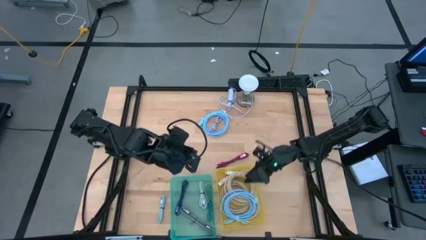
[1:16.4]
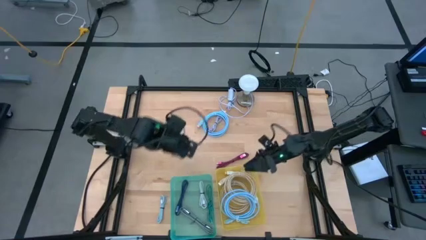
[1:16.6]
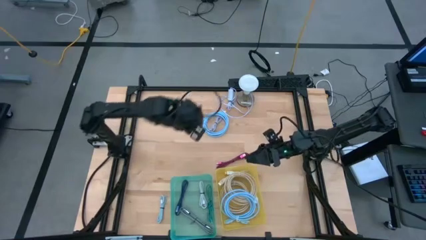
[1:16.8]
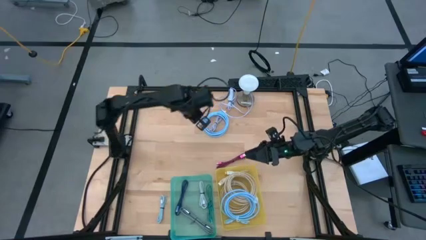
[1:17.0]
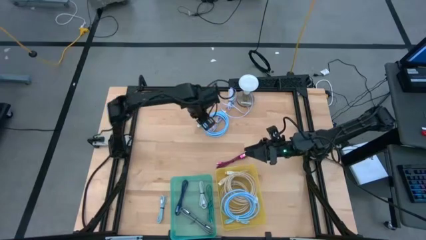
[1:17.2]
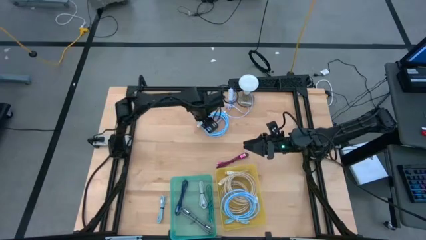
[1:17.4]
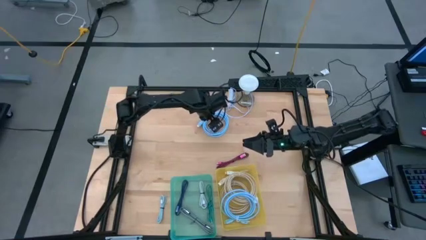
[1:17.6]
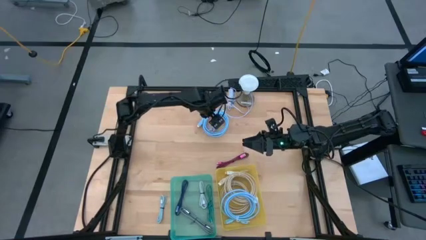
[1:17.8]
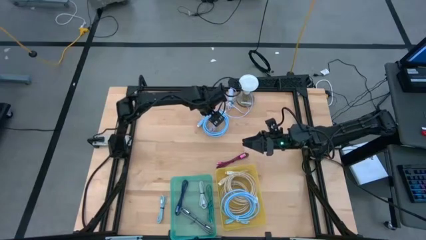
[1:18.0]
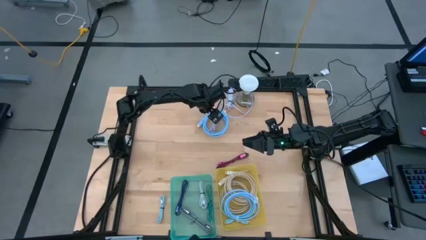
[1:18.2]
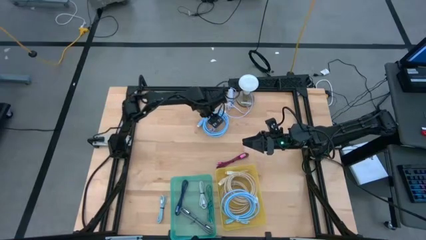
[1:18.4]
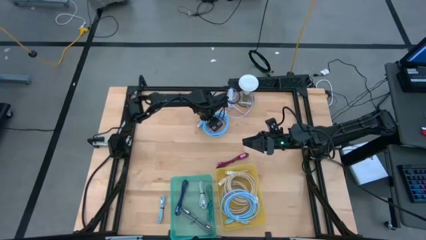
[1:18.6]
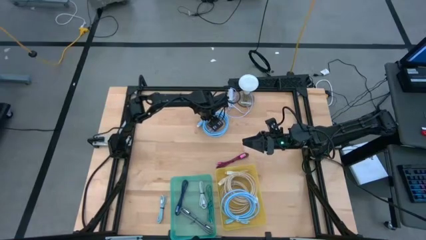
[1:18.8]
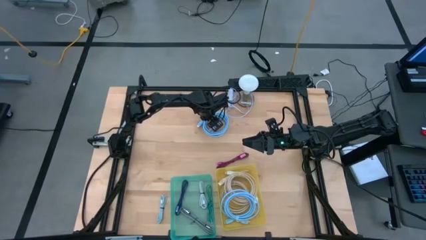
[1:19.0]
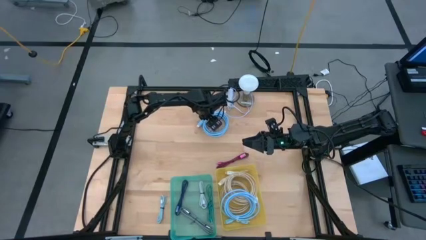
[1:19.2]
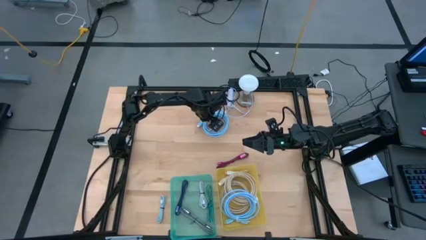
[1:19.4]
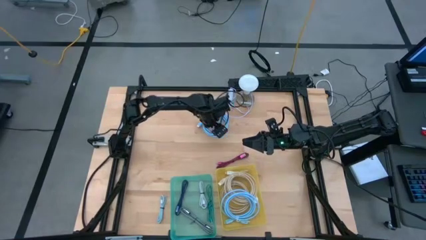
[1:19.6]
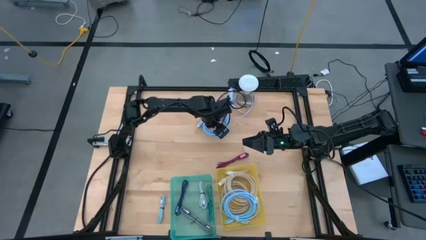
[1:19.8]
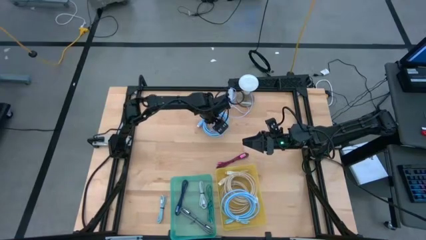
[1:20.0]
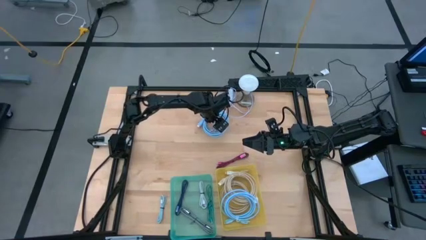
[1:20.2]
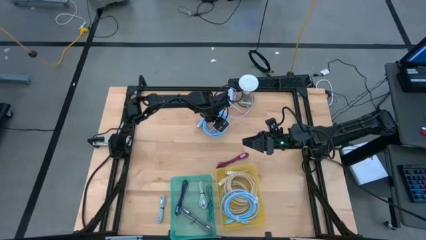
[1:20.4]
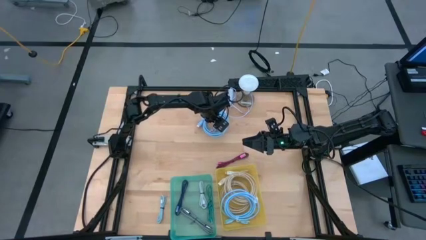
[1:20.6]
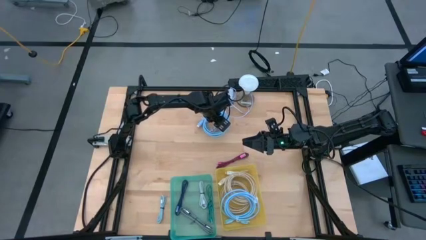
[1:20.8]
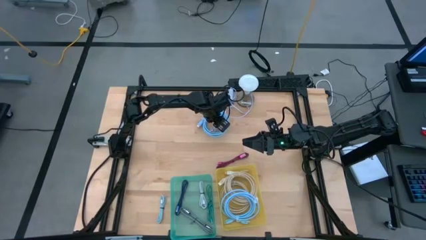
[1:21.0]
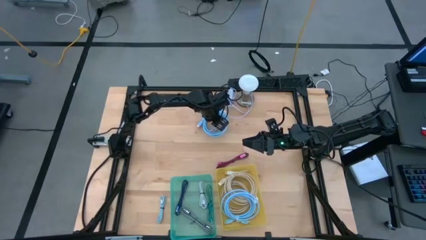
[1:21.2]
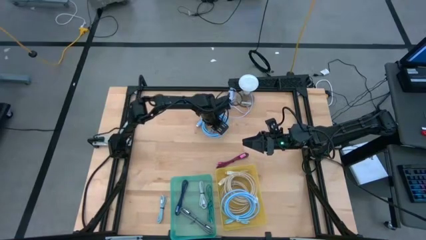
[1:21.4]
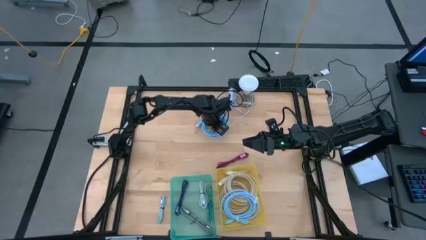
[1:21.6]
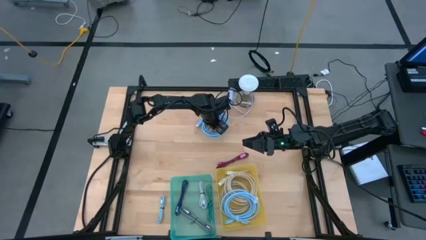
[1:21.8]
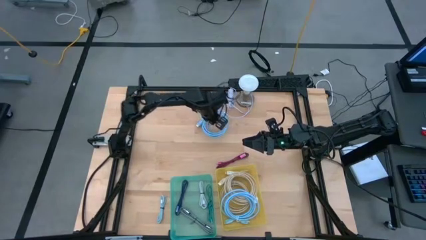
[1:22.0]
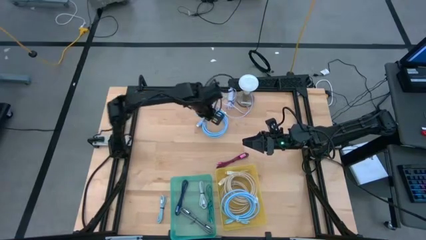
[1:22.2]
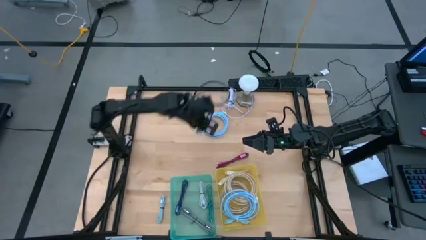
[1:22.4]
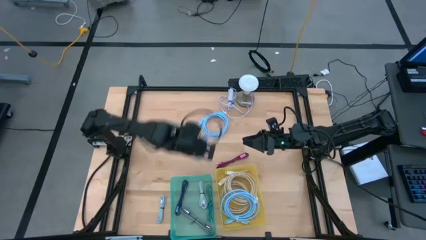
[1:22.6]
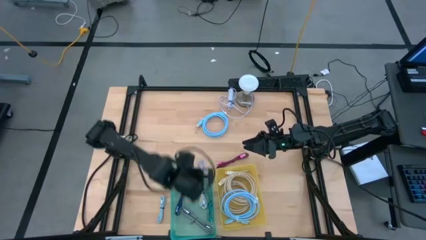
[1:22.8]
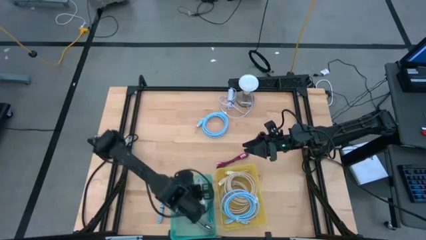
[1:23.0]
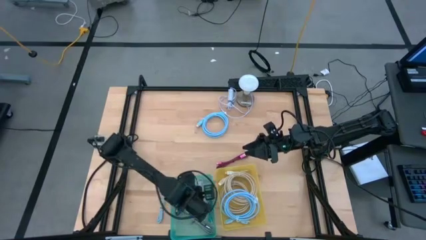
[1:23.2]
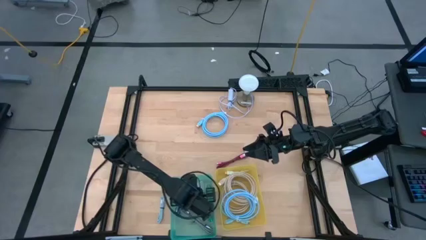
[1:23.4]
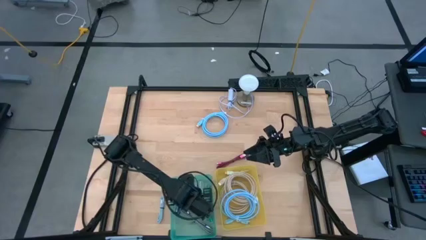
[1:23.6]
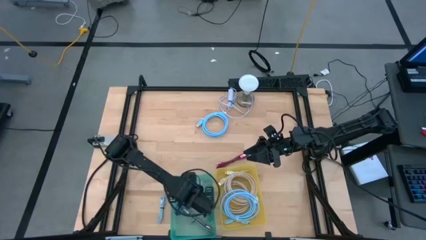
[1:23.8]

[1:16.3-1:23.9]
Task: Pick & Place USB Port
Put the violet charger cable into the green bin

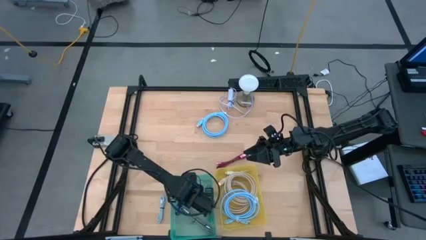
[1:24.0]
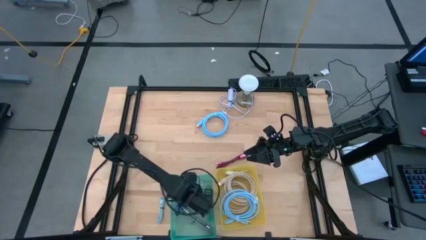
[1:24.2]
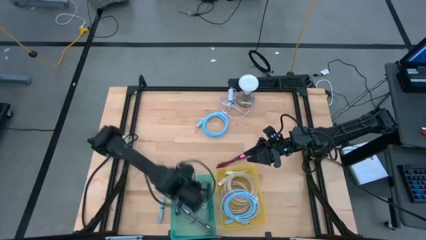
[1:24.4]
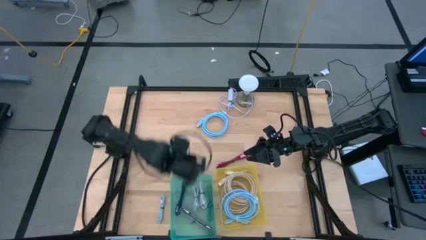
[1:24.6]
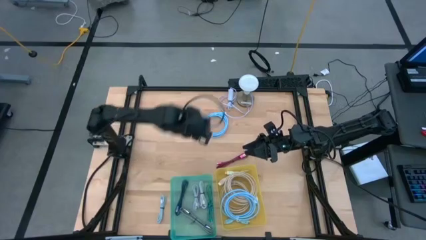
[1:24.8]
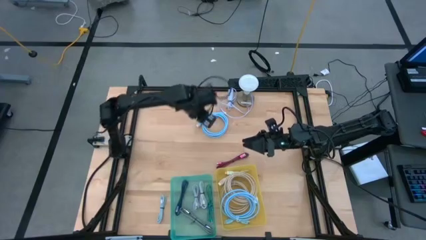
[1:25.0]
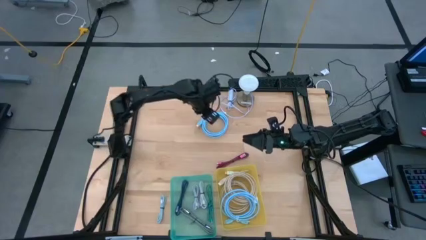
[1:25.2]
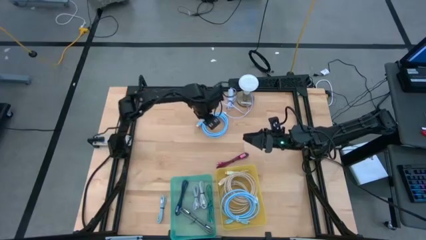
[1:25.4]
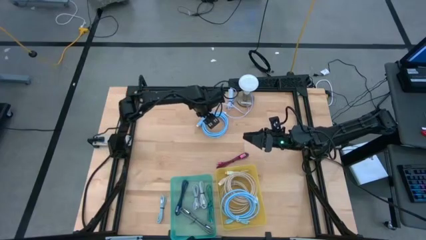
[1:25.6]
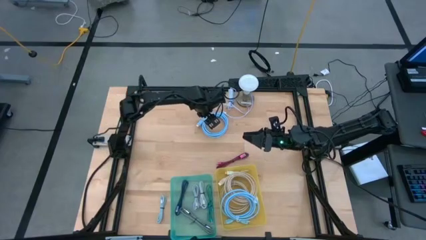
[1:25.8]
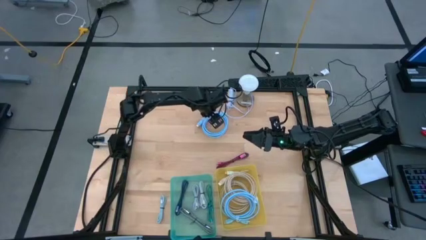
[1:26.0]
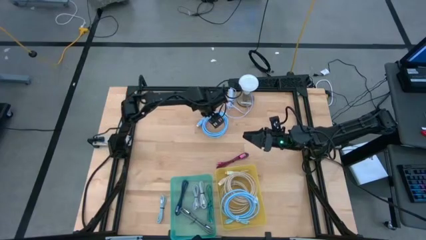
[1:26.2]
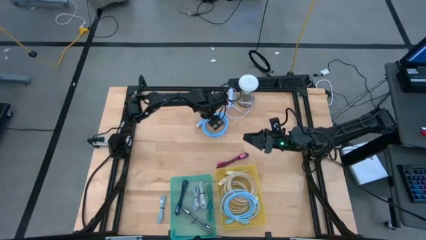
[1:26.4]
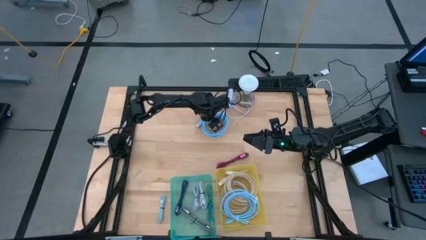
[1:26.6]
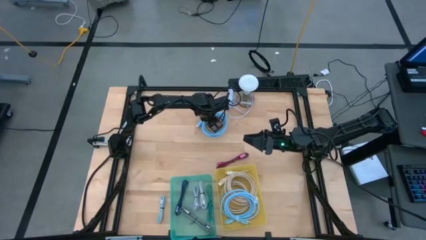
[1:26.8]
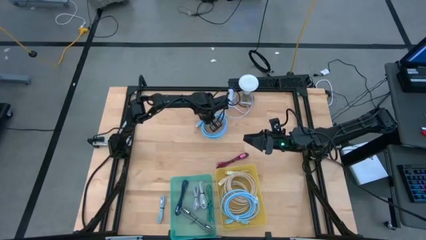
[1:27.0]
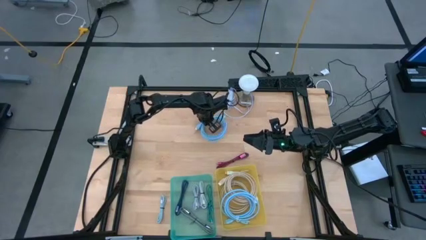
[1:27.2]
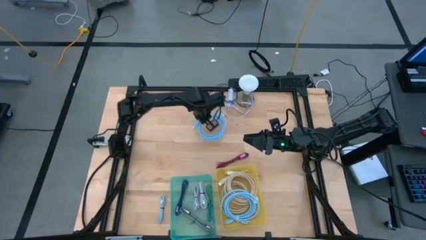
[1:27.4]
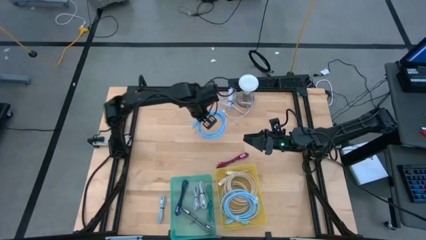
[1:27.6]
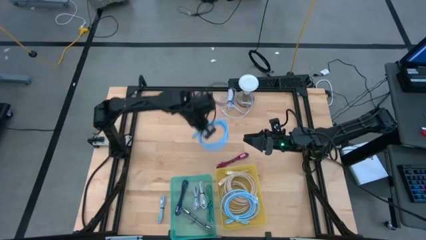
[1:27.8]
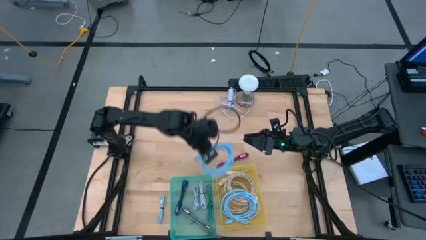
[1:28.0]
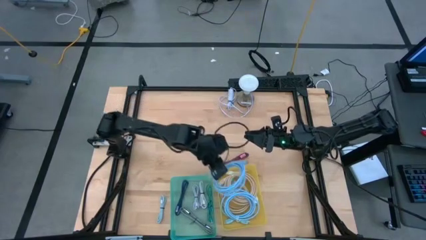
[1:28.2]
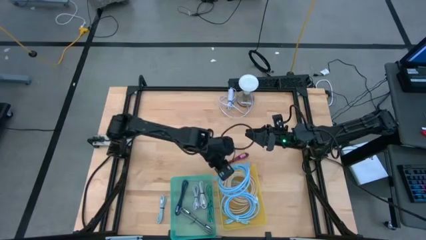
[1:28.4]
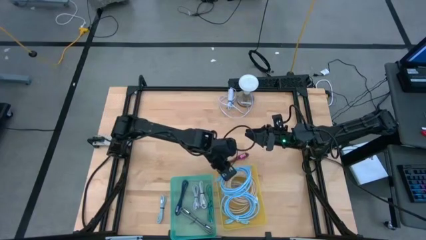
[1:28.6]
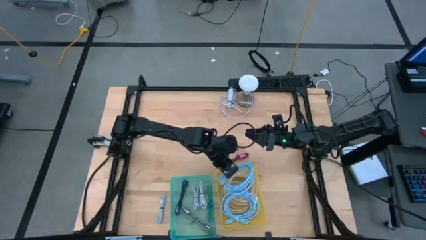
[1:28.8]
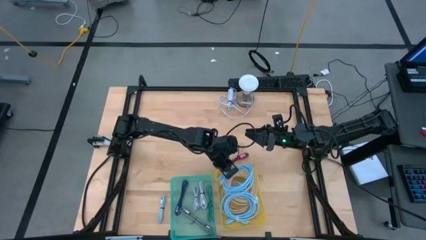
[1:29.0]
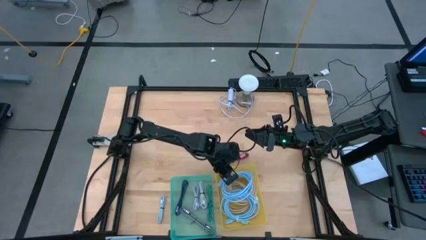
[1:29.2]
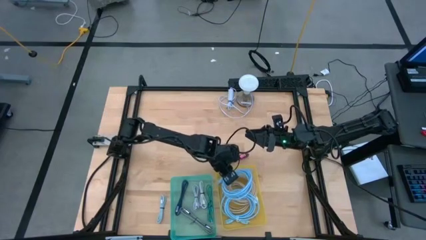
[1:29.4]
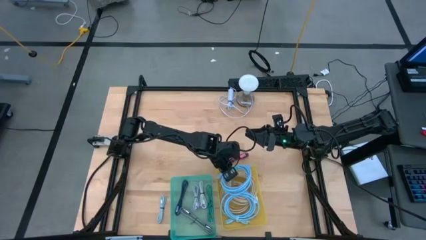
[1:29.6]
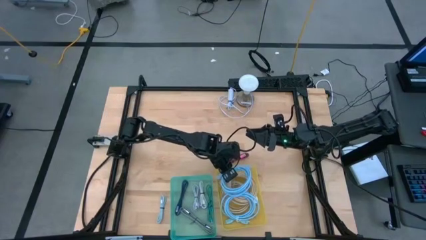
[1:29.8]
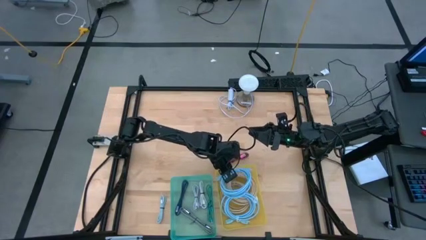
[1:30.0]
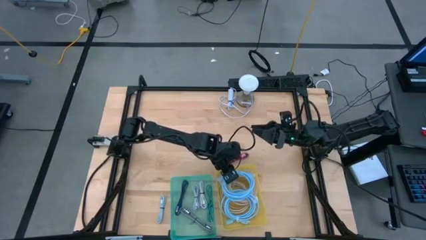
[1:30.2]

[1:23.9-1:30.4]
Put the light blue hdmi cable into the yellow bin
